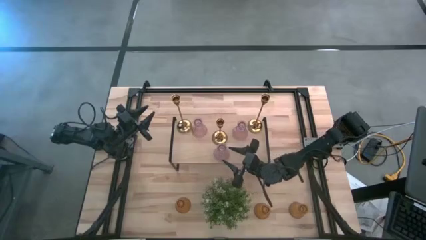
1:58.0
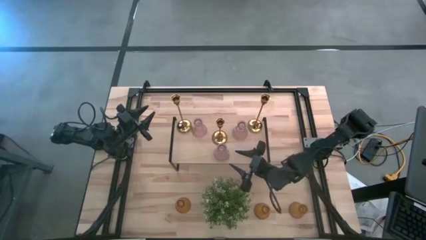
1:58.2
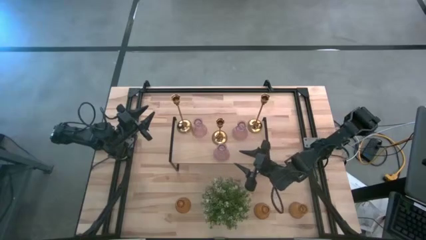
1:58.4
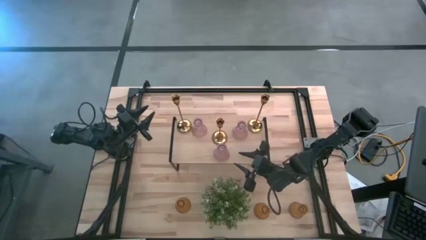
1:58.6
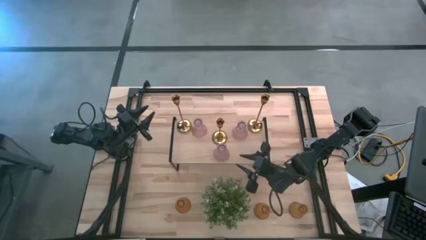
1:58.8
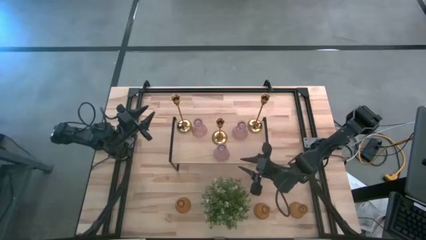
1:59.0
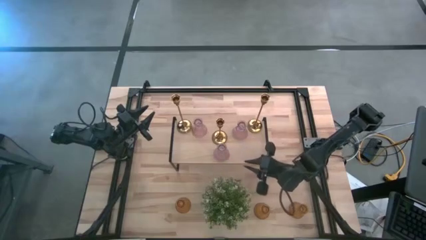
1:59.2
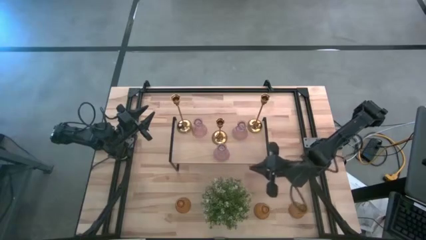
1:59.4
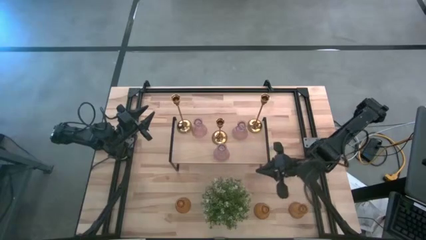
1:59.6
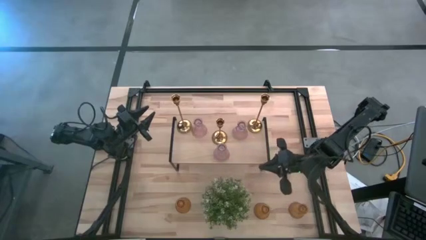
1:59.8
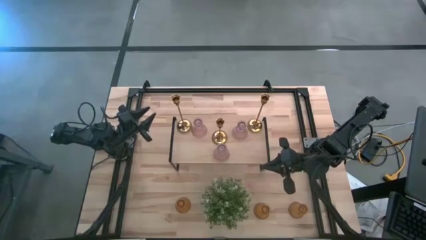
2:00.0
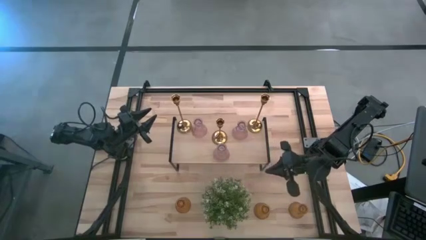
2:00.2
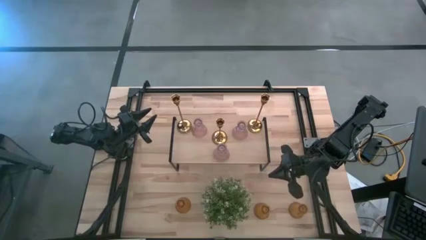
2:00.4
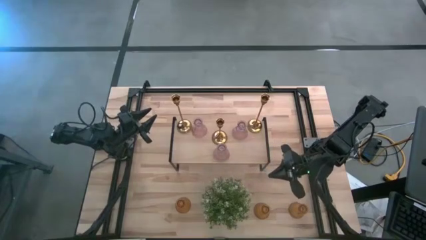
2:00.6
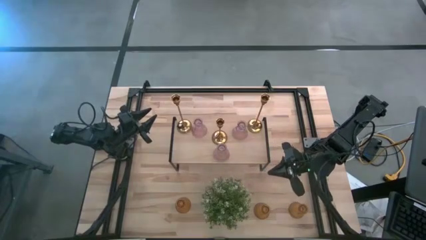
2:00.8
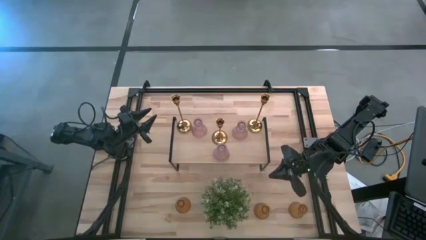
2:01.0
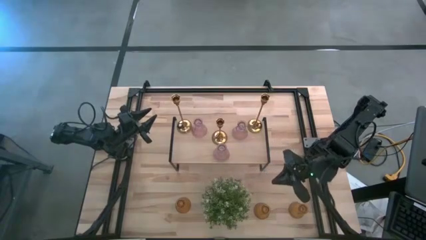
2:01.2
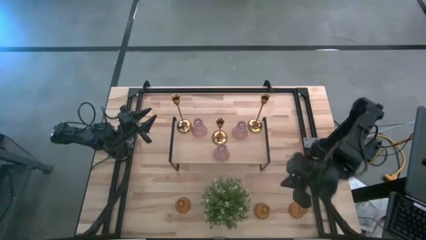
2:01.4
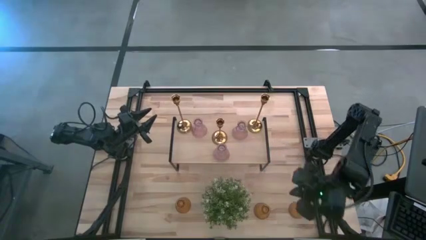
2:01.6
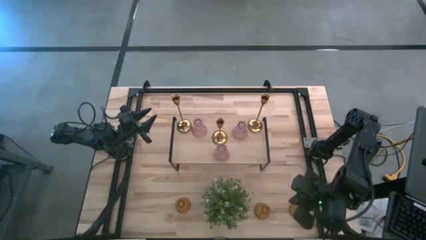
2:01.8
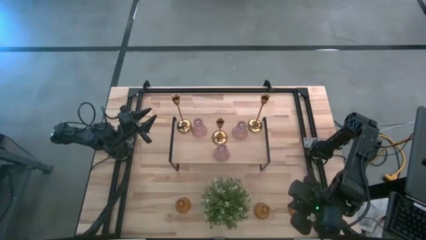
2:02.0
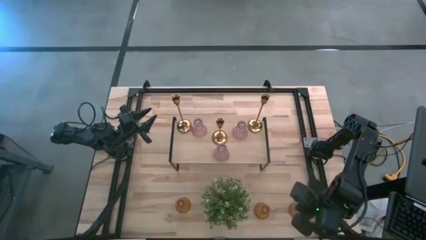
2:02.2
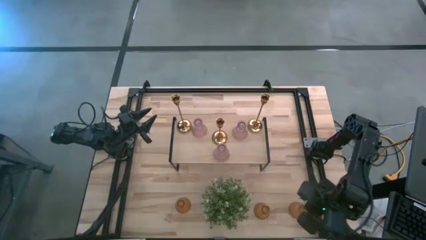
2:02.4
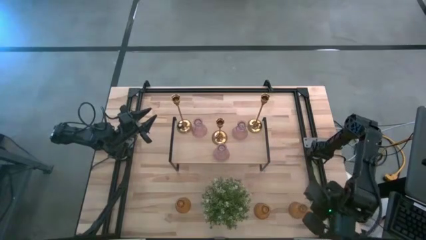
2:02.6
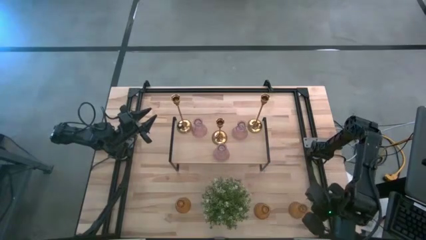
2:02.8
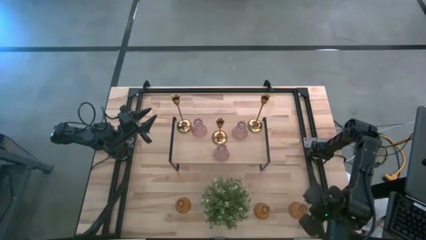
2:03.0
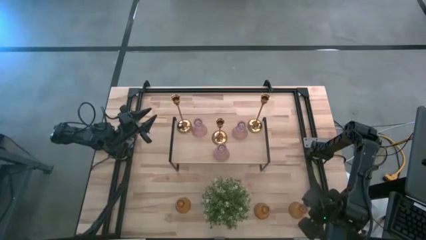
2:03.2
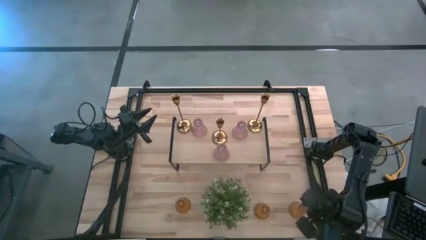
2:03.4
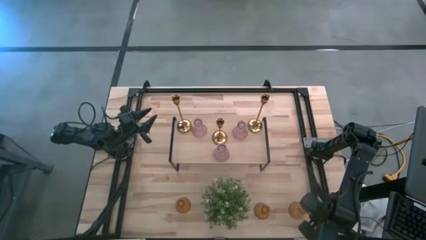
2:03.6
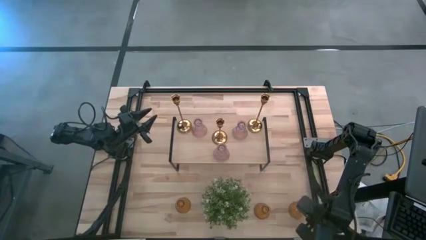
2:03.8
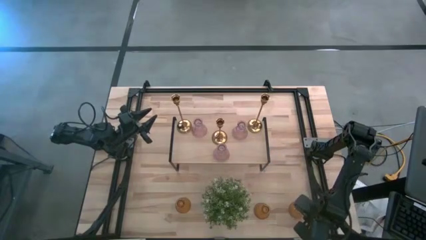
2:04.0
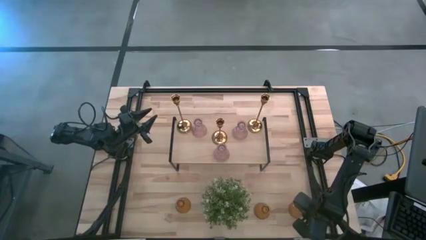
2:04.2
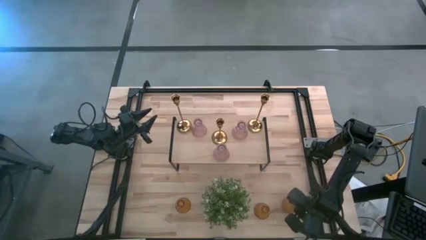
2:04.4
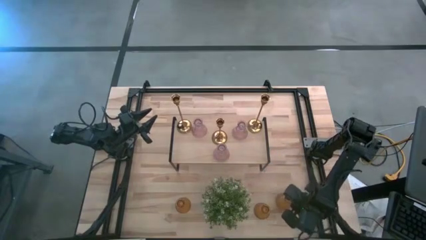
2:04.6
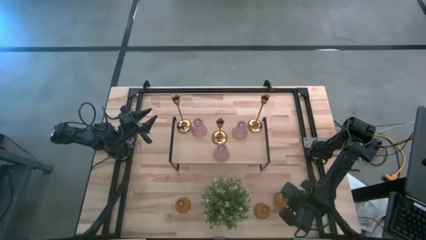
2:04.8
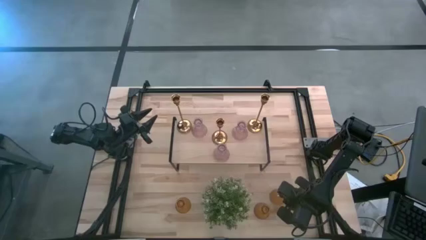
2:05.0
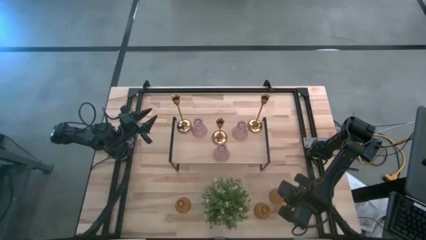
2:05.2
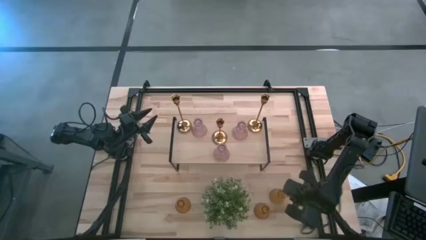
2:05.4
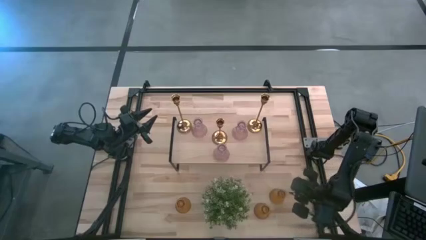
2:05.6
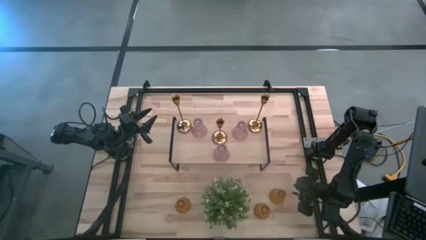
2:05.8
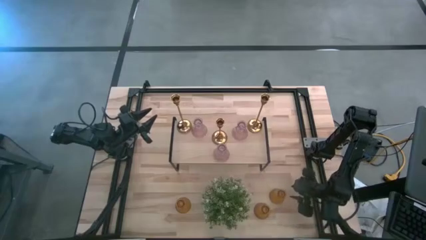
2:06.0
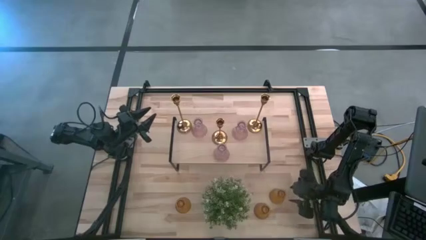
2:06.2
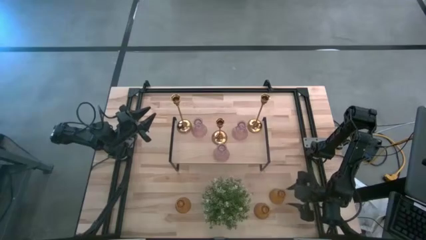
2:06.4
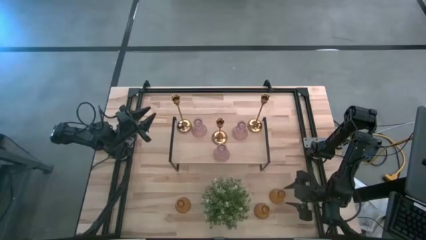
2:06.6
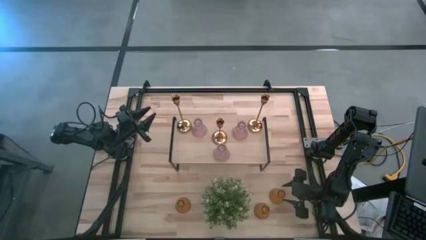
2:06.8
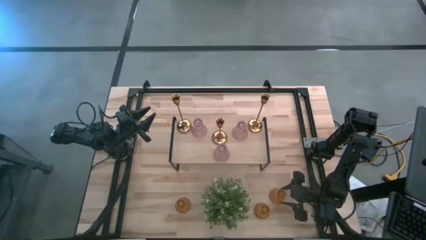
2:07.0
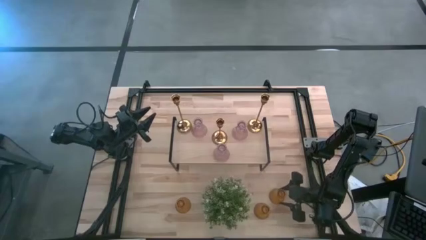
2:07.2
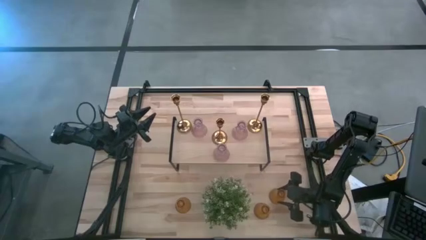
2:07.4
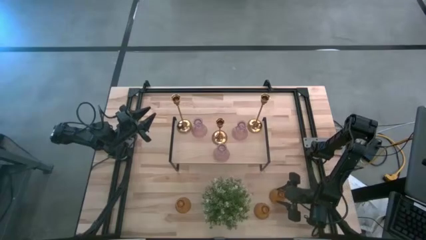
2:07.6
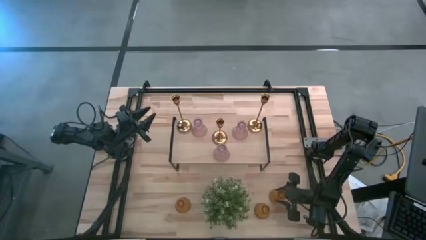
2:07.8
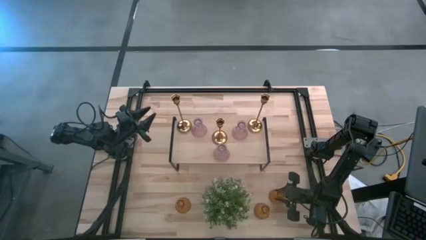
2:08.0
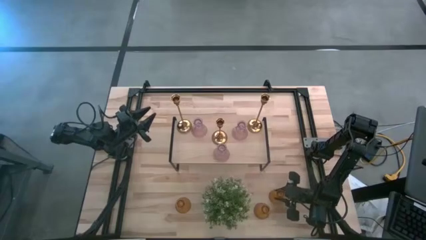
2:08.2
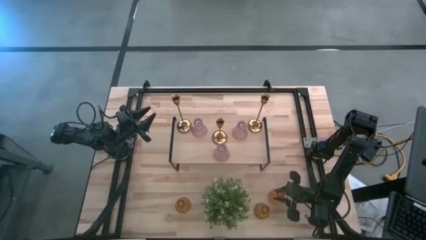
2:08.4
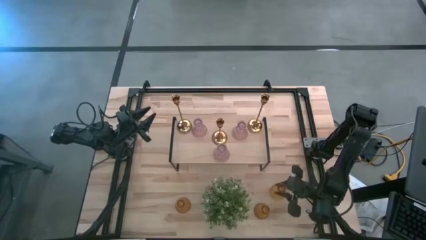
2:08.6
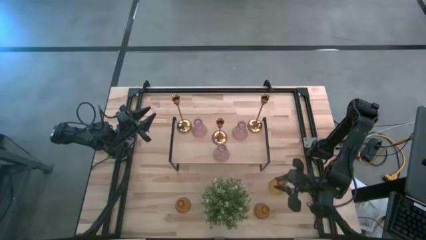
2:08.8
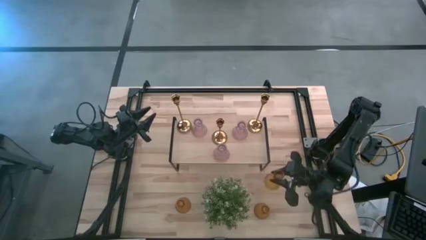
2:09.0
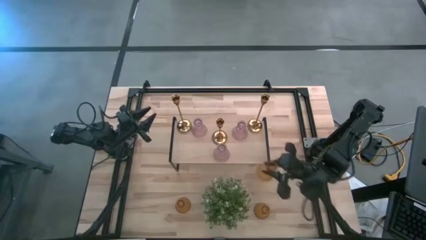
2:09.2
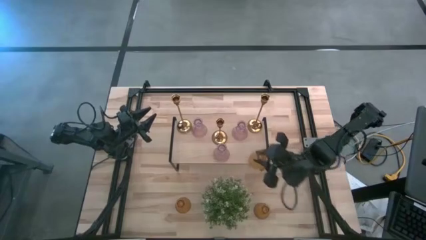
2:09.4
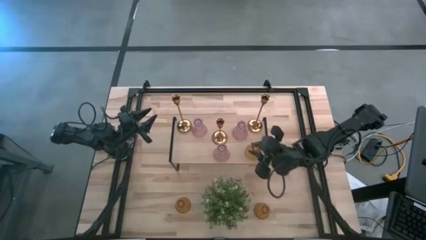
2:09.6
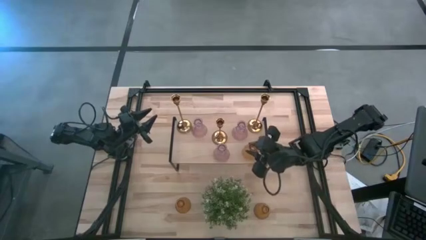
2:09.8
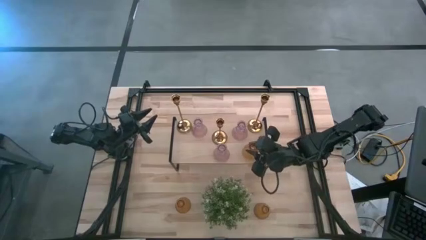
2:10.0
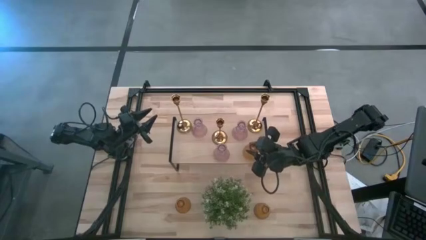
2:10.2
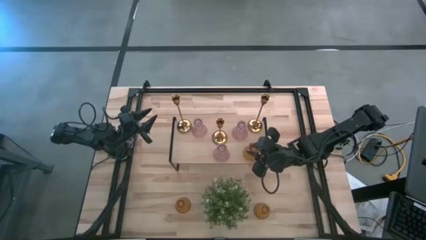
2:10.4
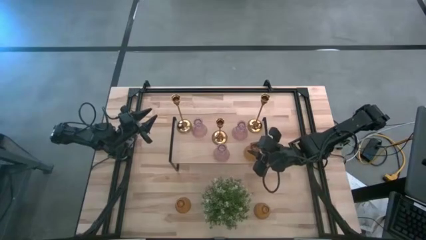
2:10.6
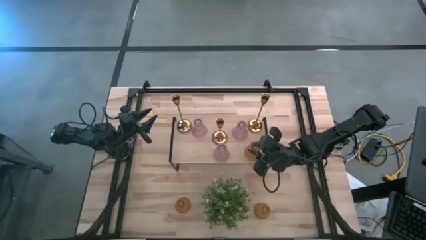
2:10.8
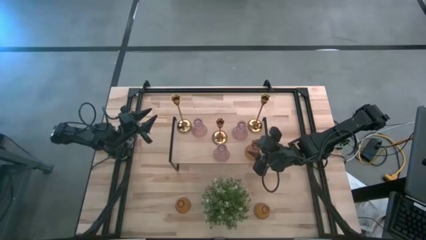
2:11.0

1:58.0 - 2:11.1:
Task: Pick & Place candle stick holders
Put the right yellow vase on the shelf

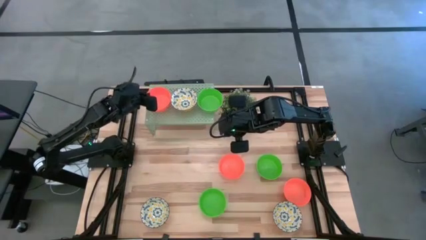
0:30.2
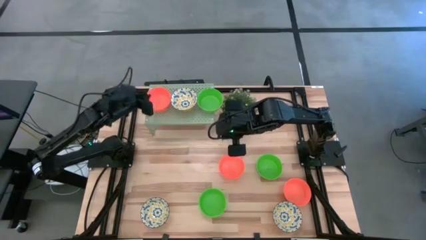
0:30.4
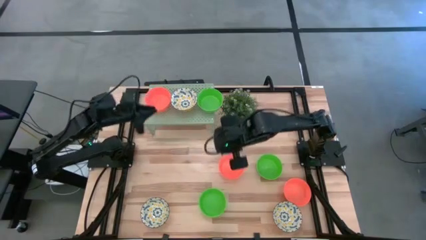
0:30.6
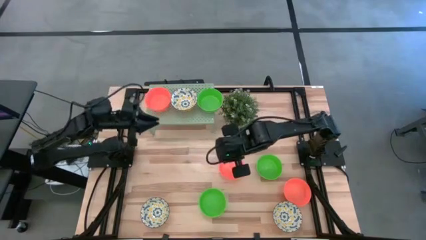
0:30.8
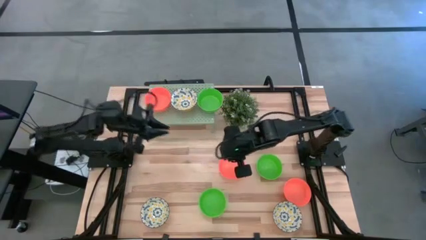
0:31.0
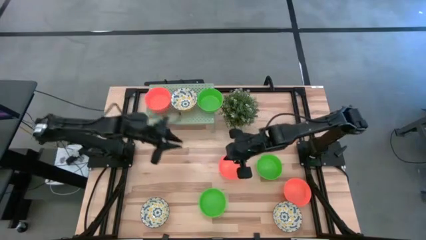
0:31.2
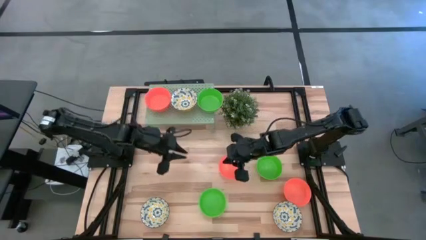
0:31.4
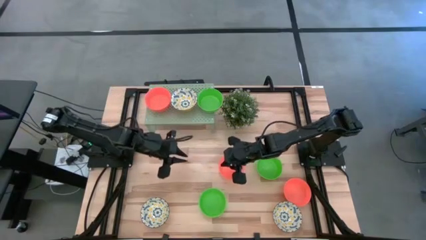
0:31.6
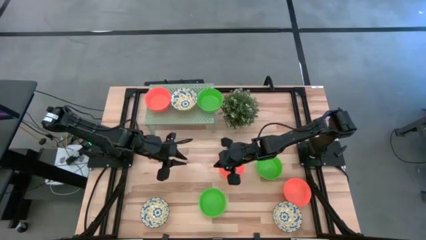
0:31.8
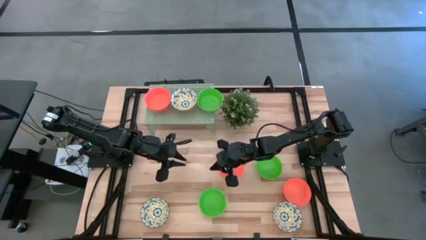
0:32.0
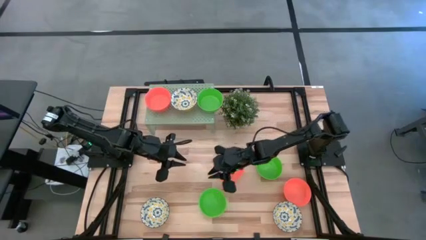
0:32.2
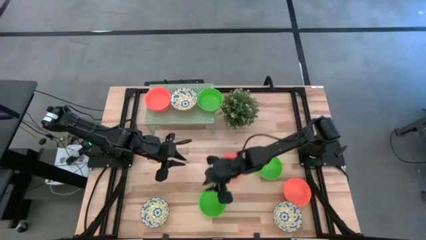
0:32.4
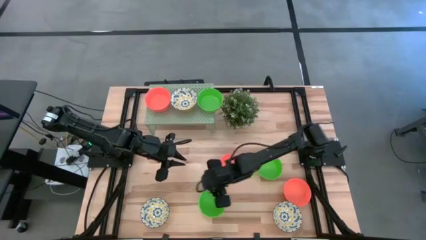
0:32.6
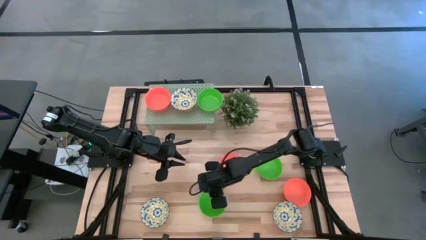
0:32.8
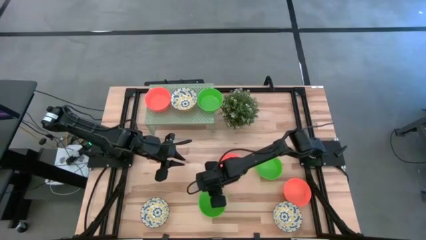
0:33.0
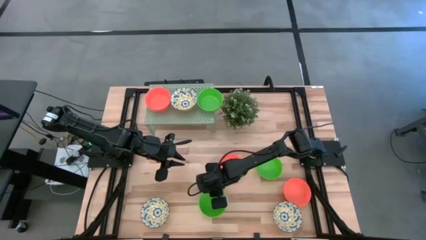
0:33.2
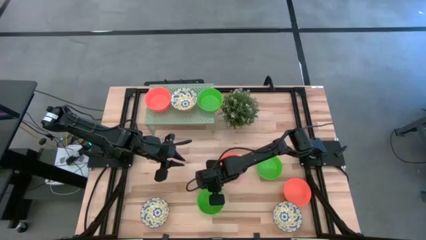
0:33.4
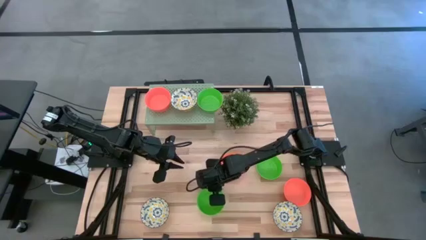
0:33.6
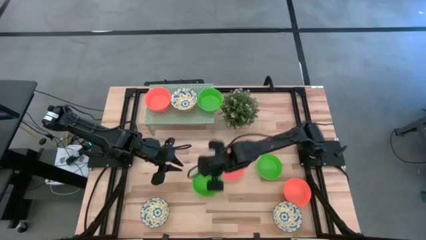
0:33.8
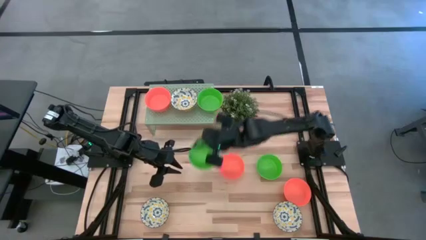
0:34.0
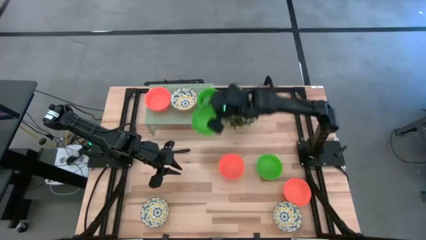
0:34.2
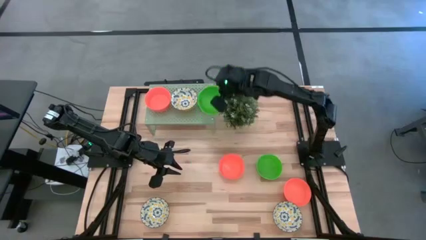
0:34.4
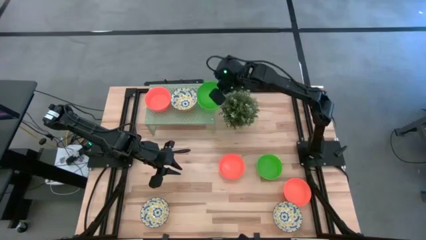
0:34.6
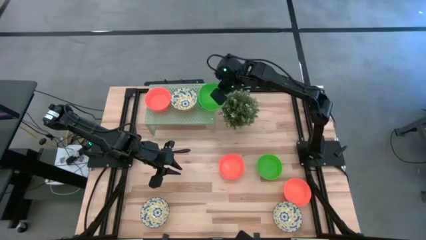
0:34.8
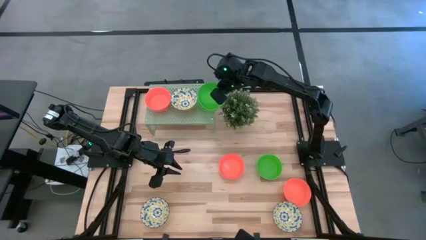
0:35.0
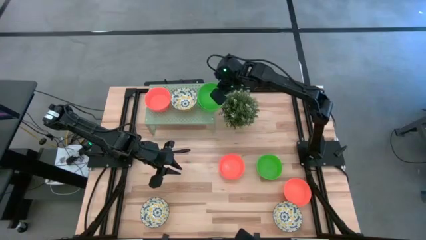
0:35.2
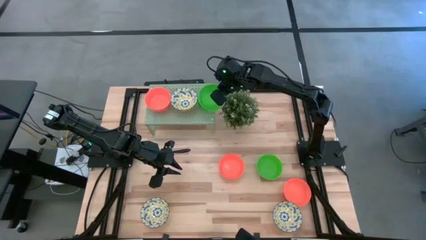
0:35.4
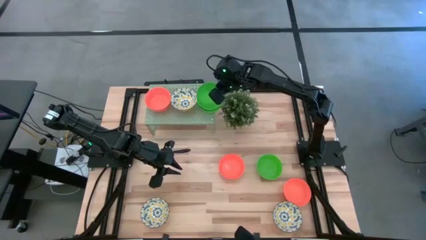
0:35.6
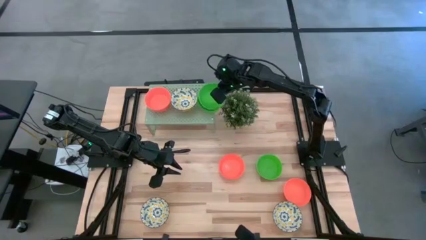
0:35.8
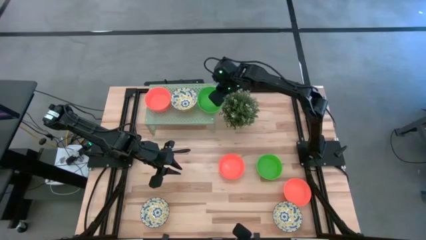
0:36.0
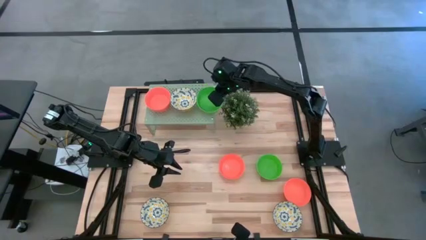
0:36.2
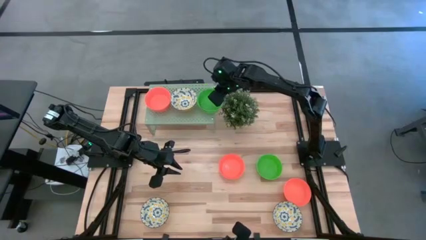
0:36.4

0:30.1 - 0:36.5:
Task: Pick & Place Mini bowls
Stack the green bowl on top of the green bowl on the shelf
